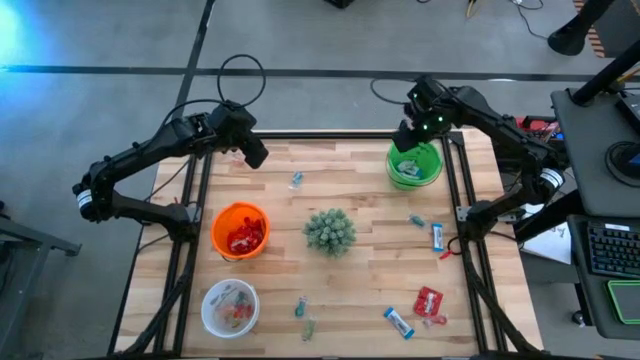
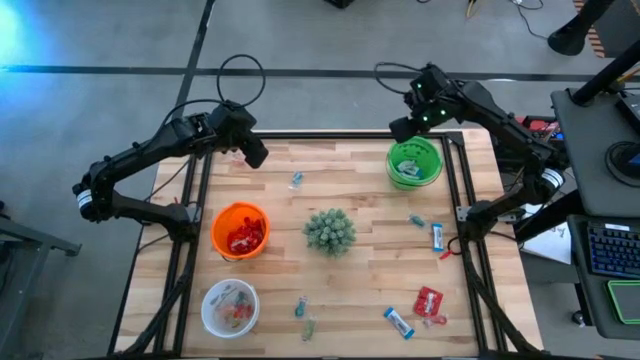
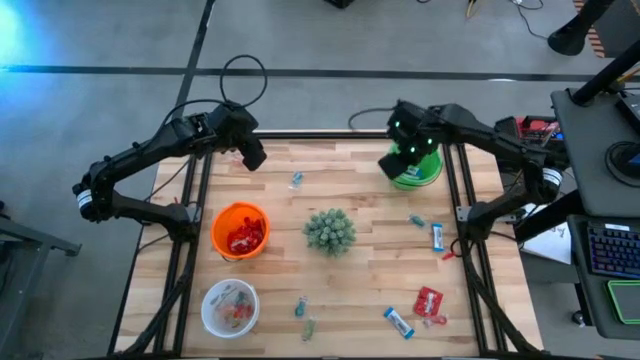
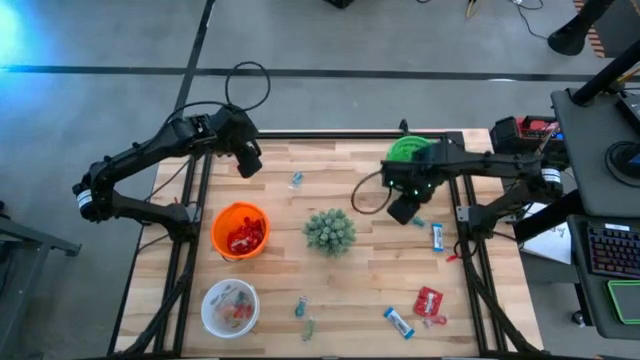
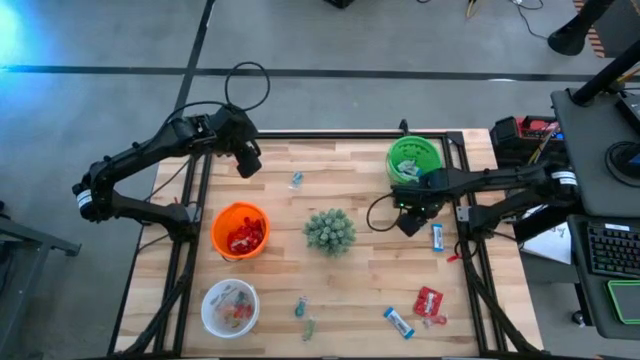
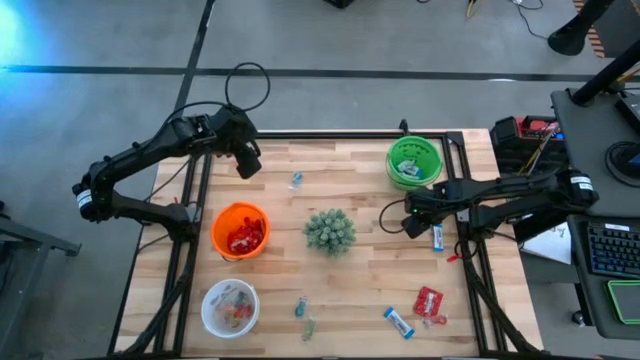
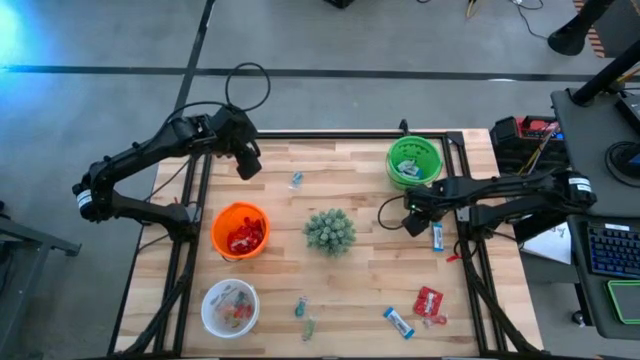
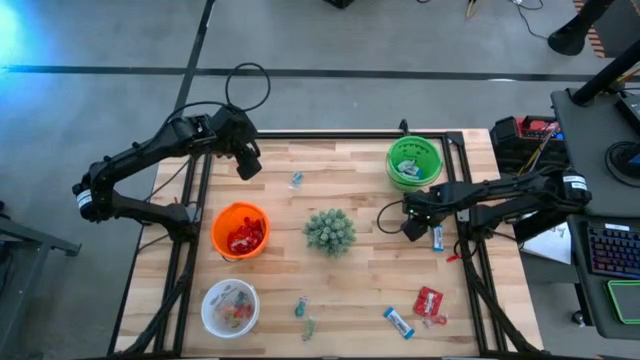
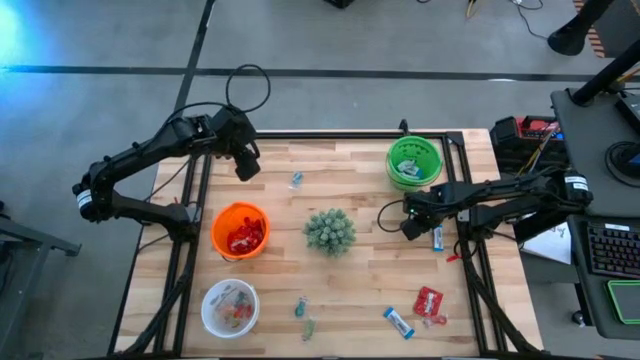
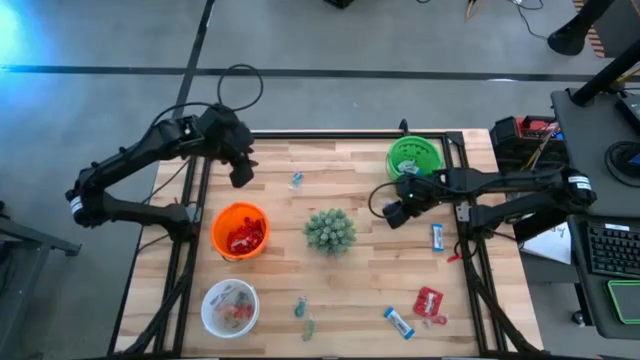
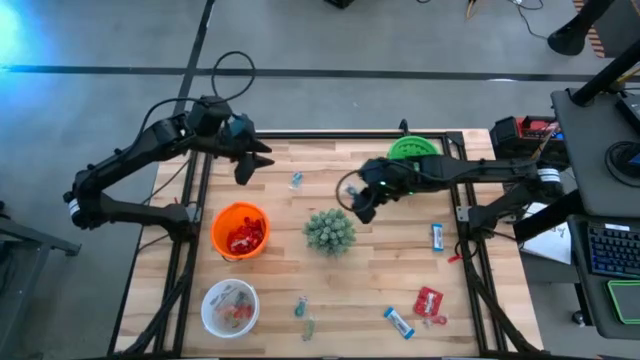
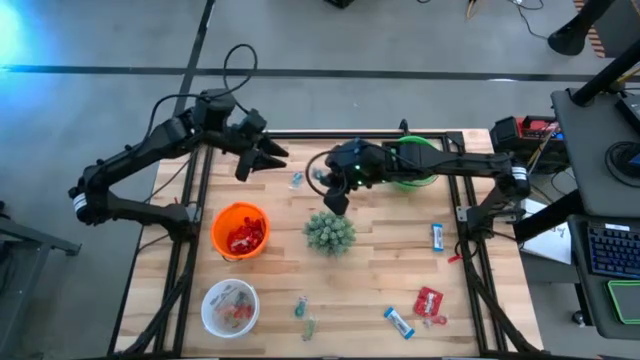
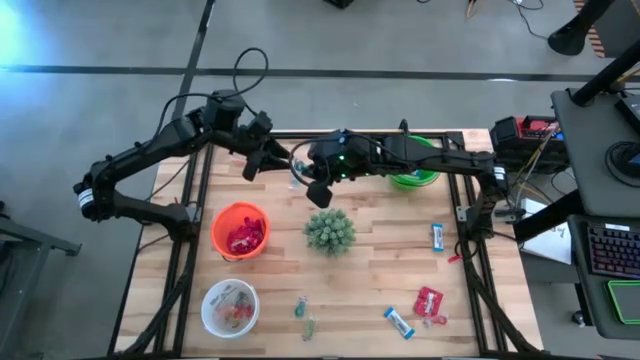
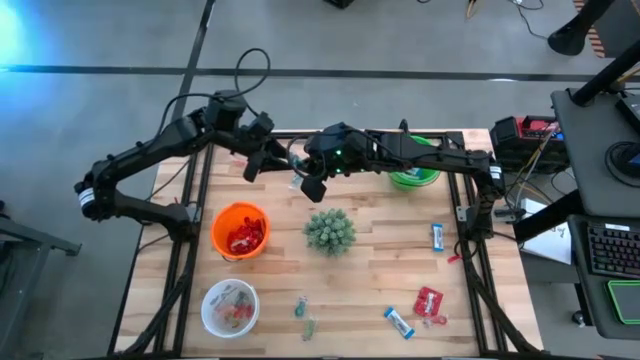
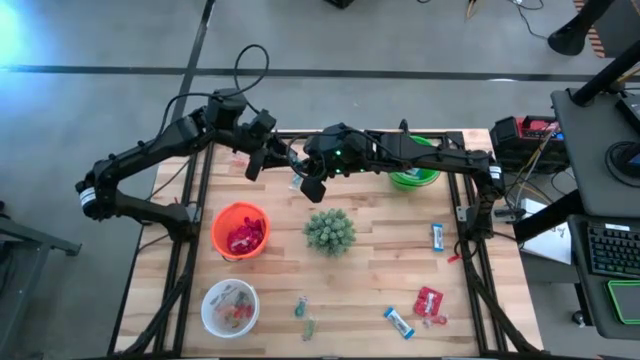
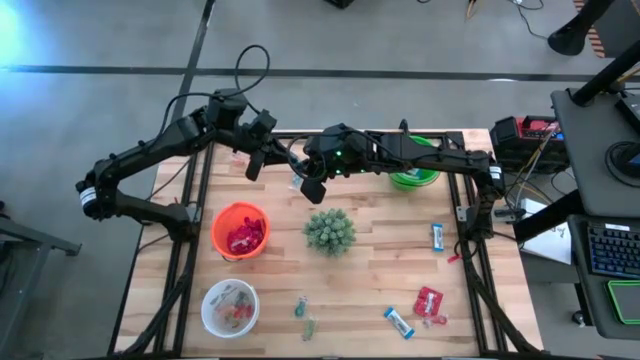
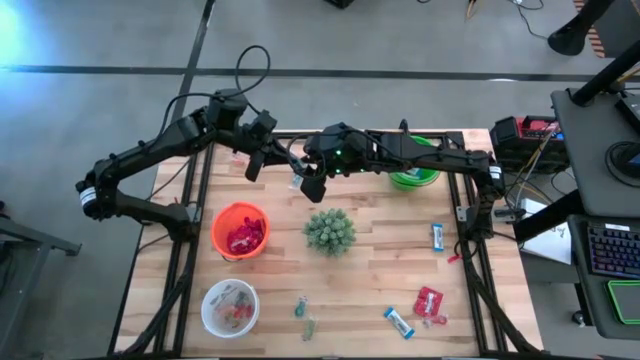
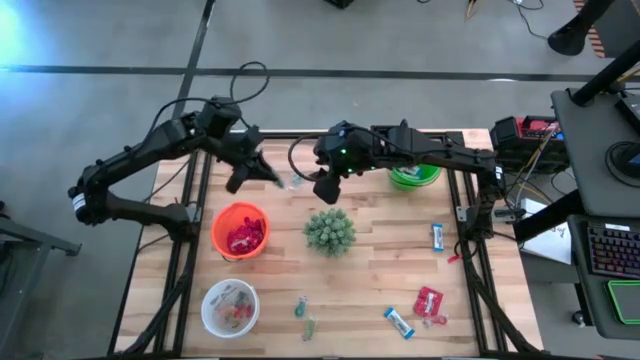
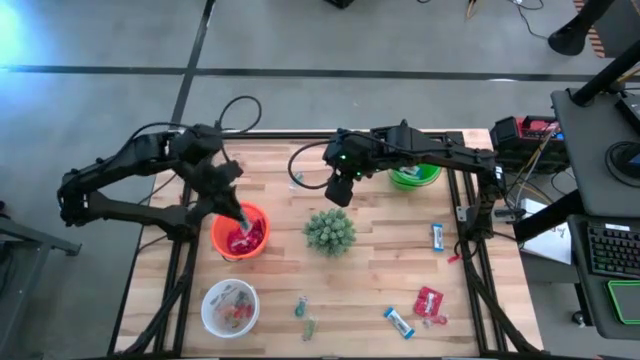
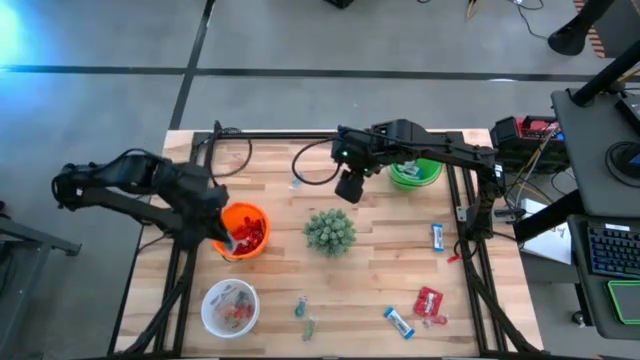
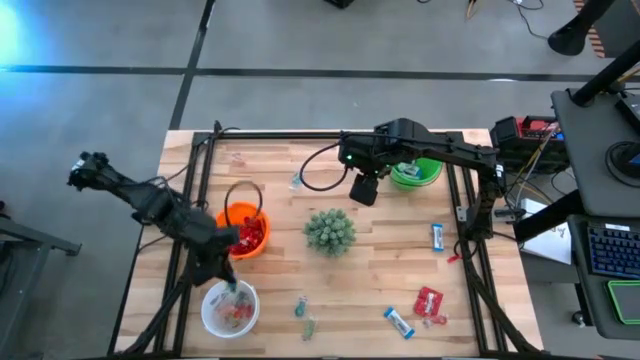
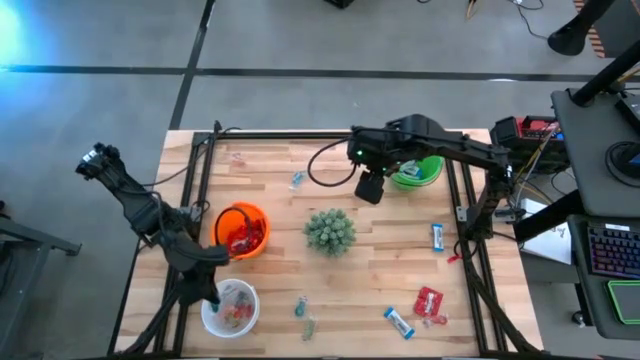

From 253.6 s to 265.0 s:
Task: Sort candy
Put the blue gummy into the white bucket

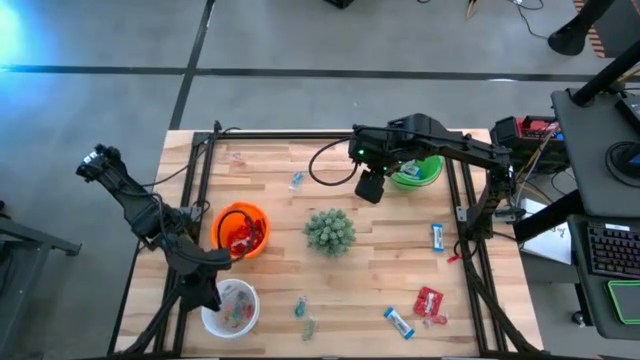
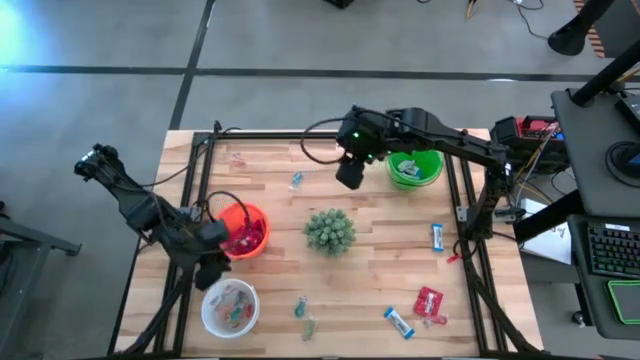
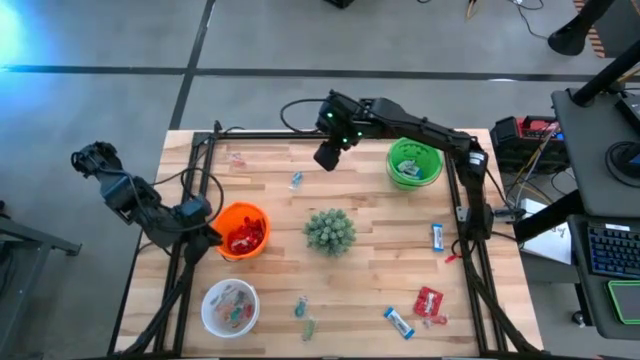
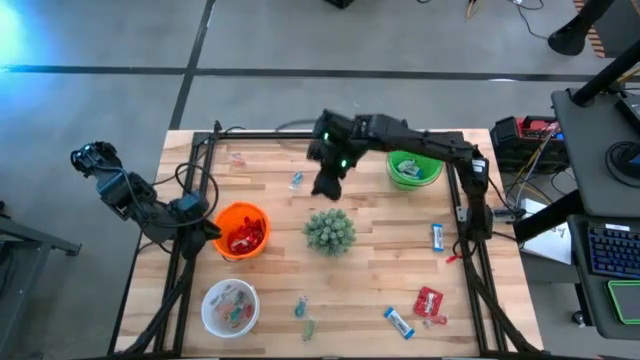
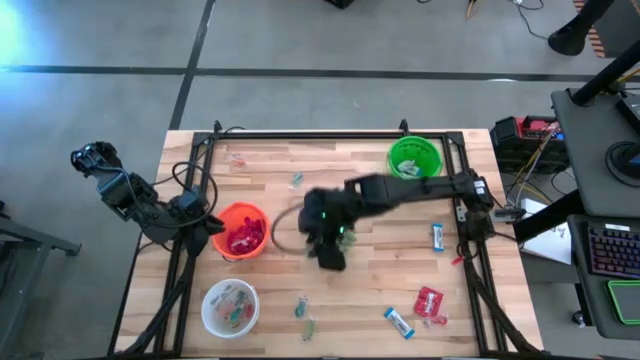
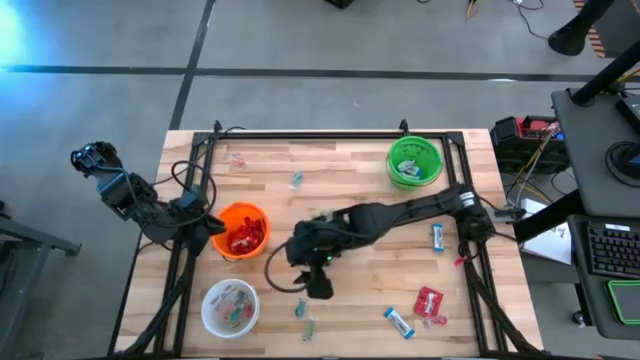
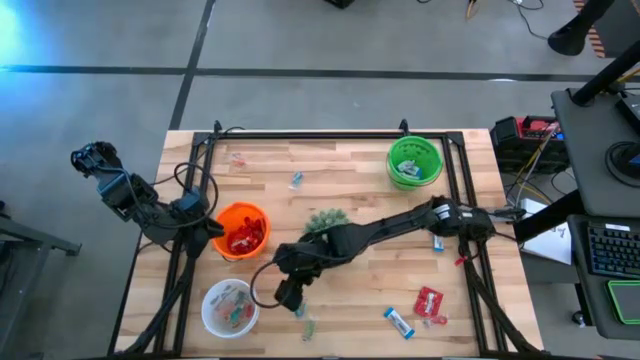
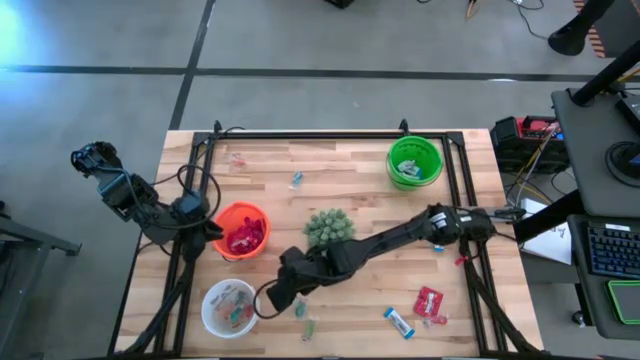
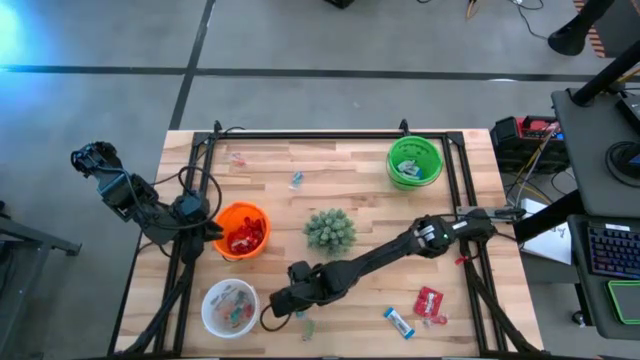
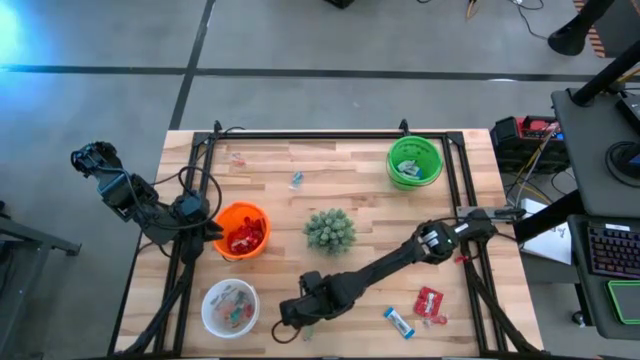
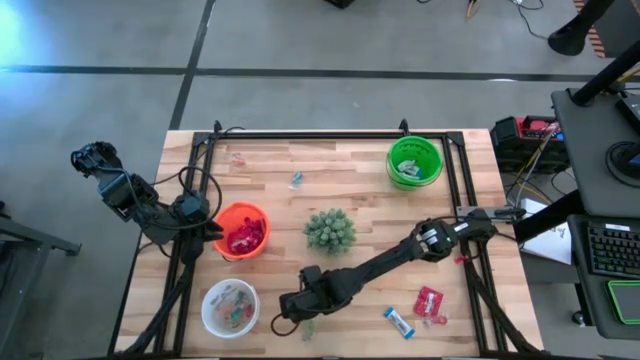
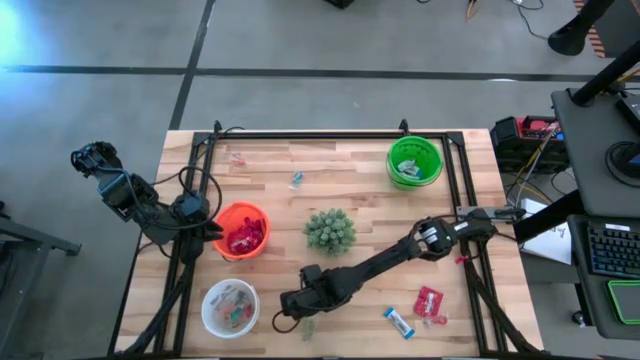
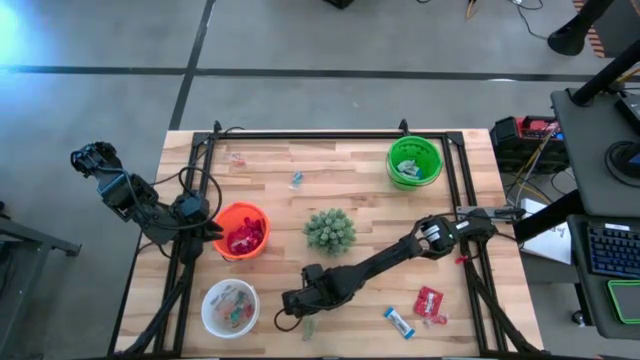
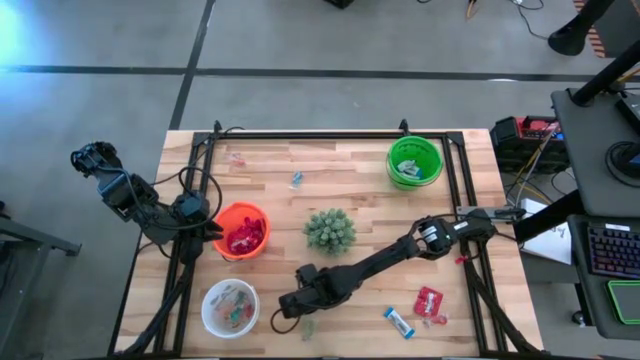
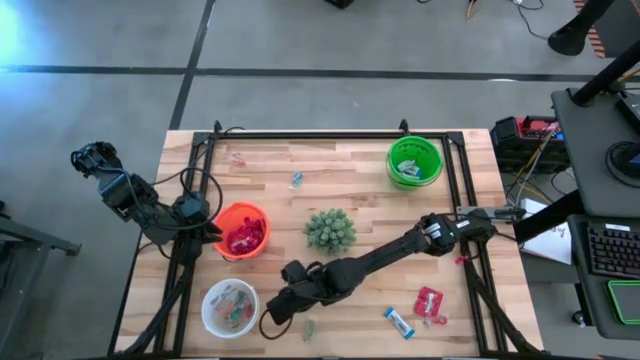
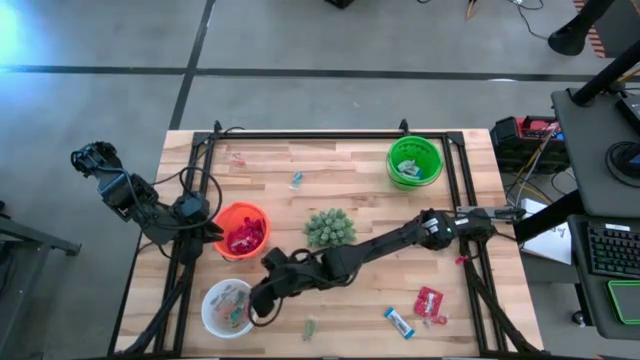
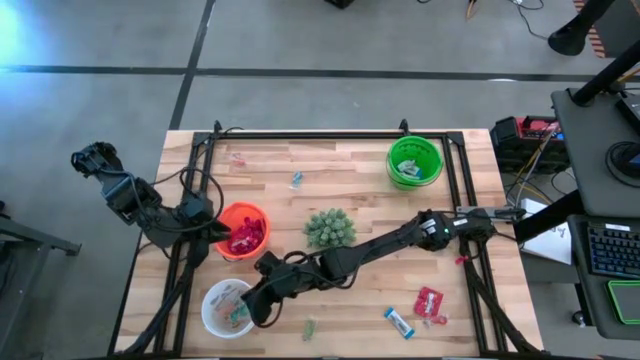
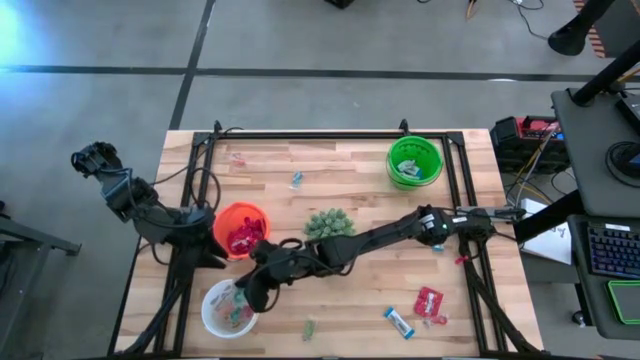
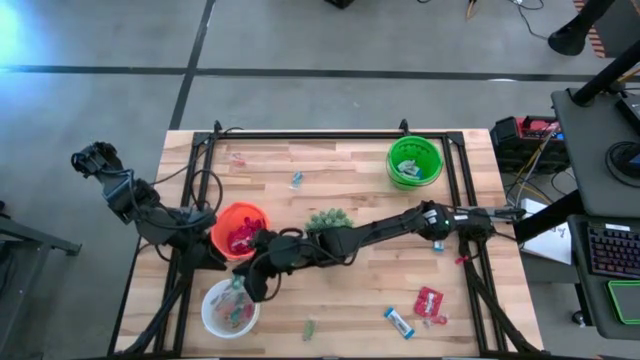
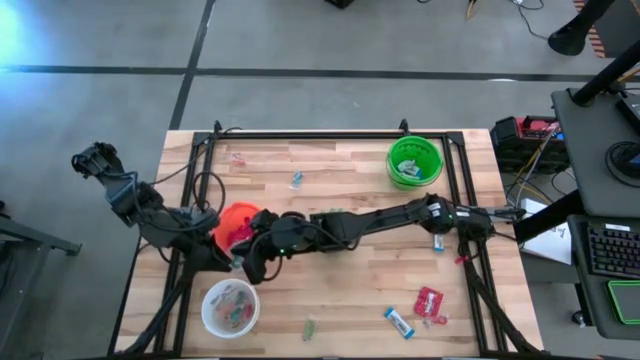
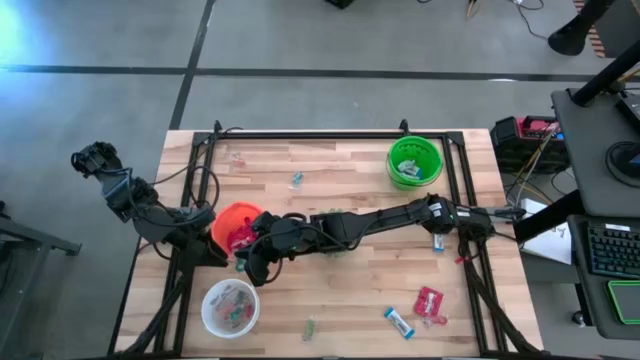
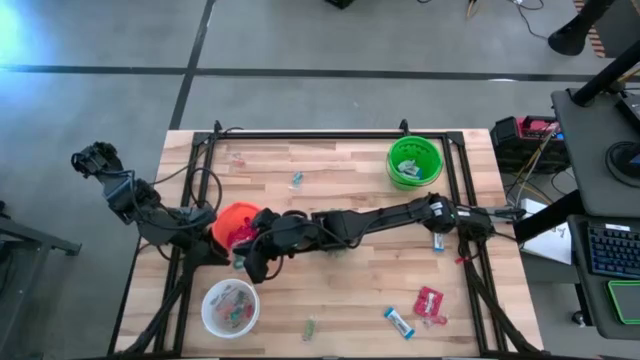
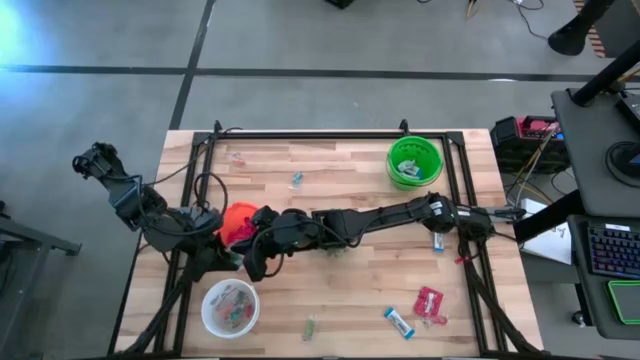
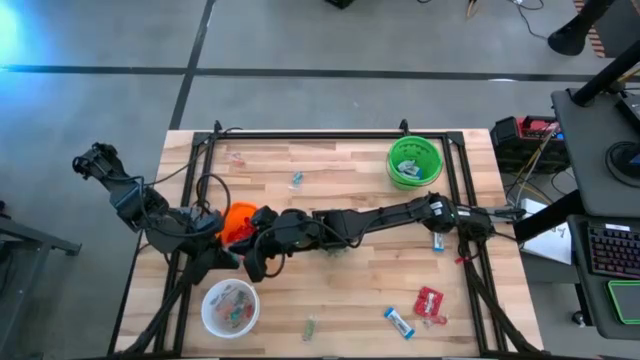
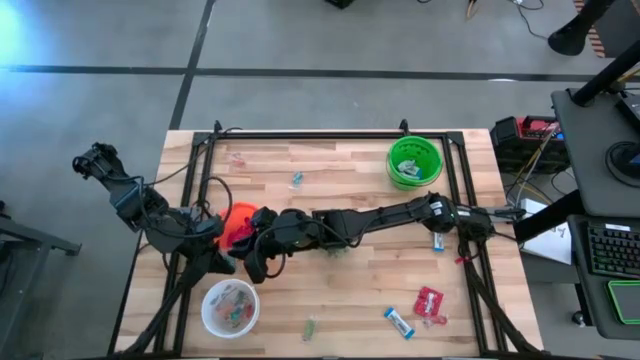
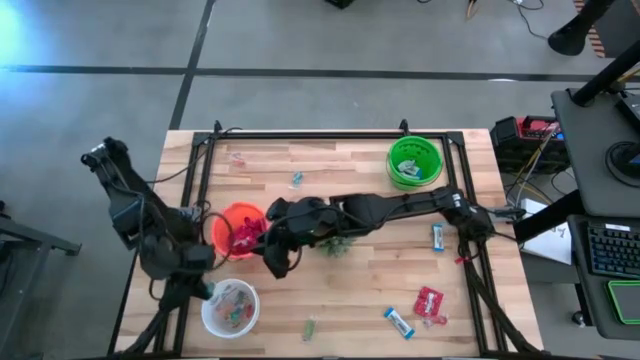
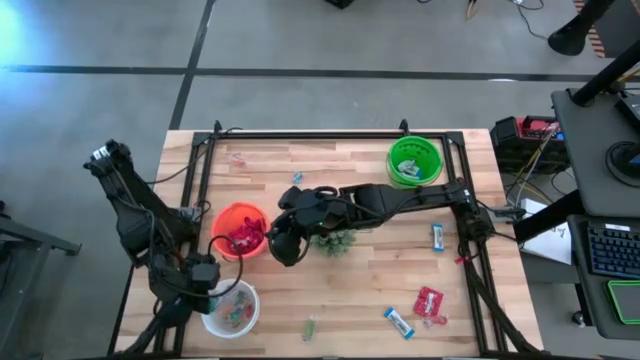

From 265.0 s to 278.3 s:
Put the blue gummy into the white bucket
